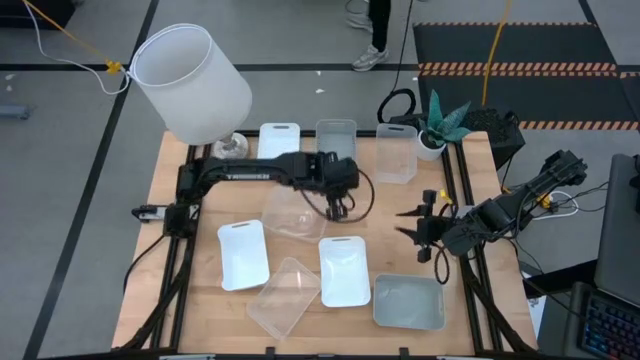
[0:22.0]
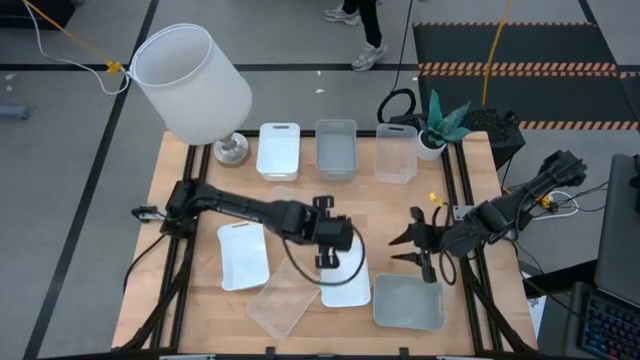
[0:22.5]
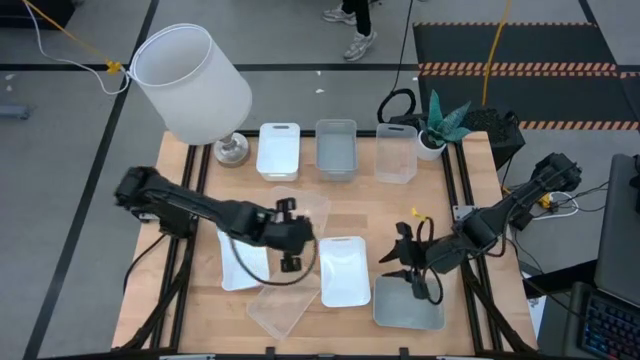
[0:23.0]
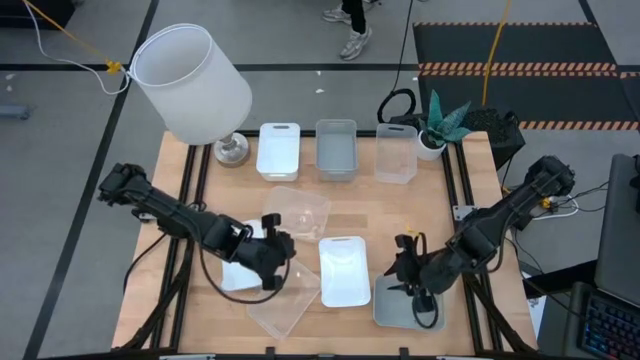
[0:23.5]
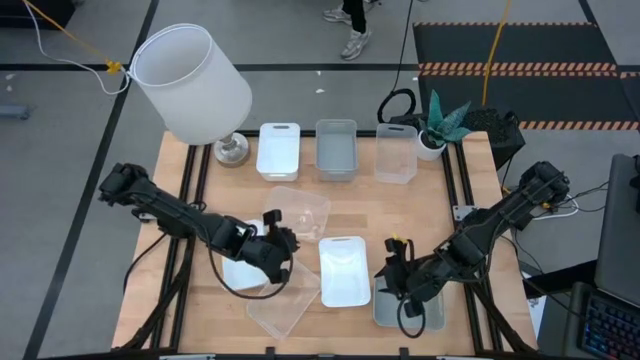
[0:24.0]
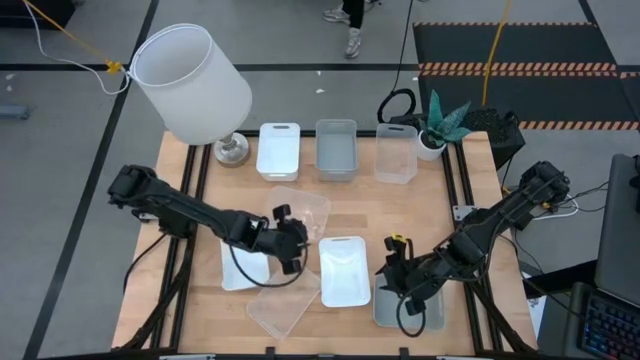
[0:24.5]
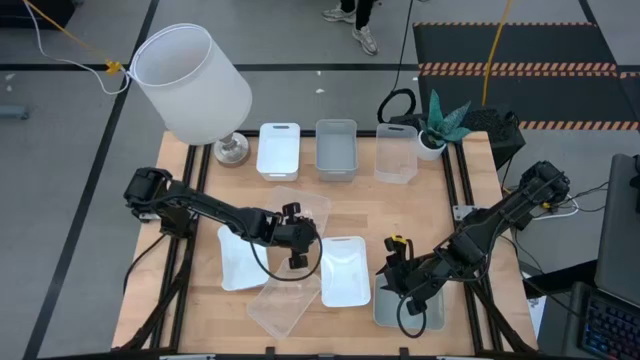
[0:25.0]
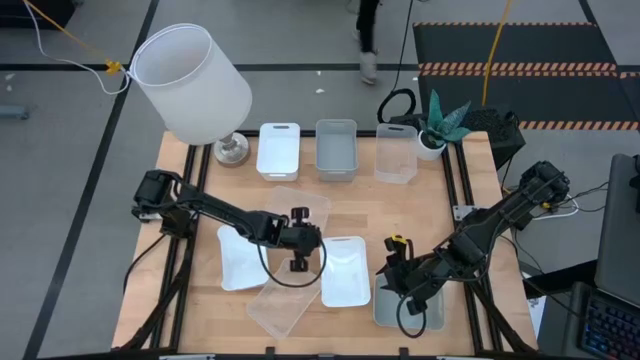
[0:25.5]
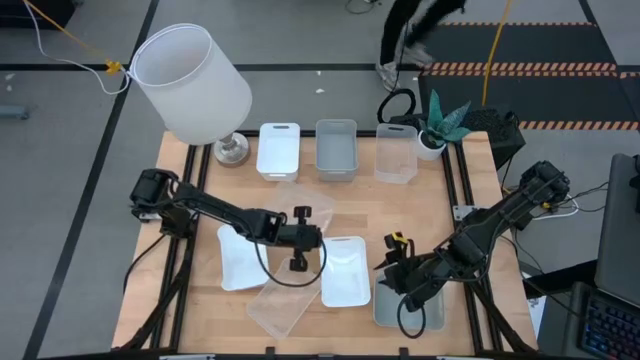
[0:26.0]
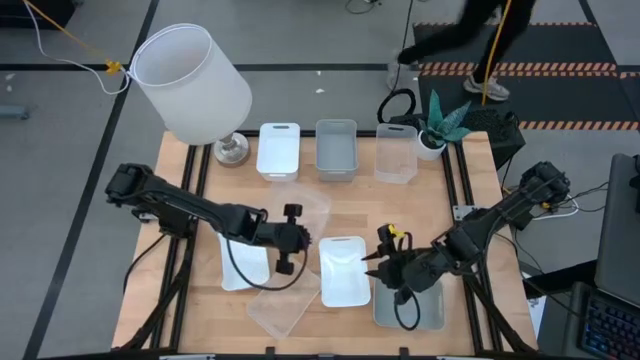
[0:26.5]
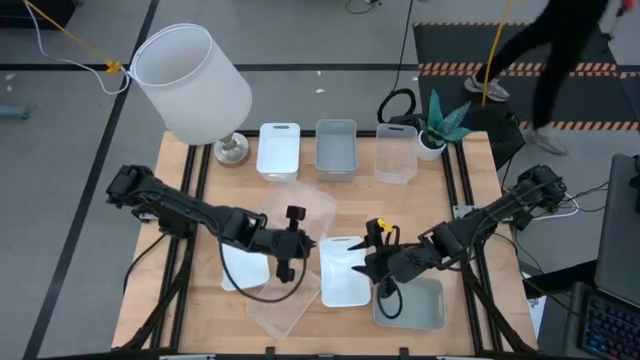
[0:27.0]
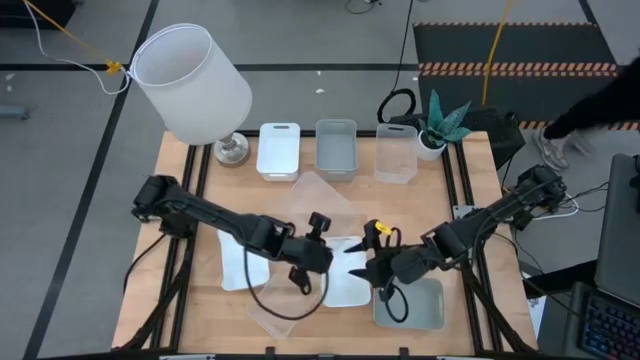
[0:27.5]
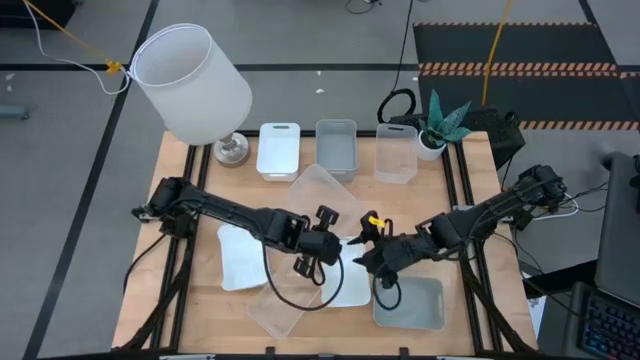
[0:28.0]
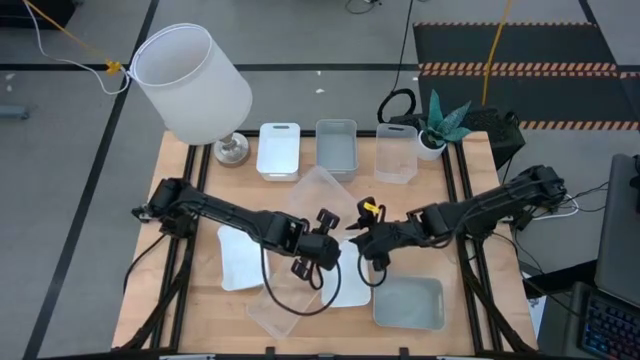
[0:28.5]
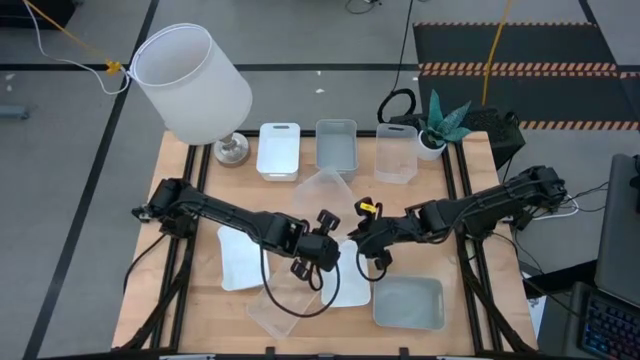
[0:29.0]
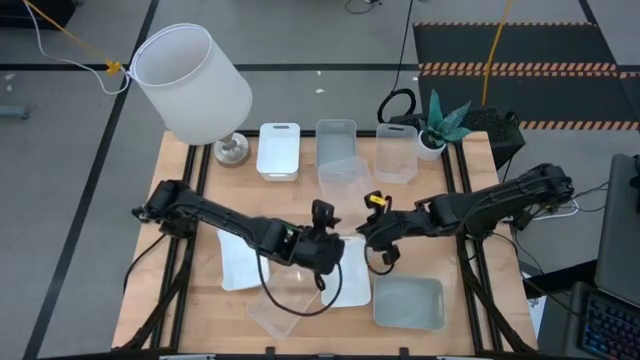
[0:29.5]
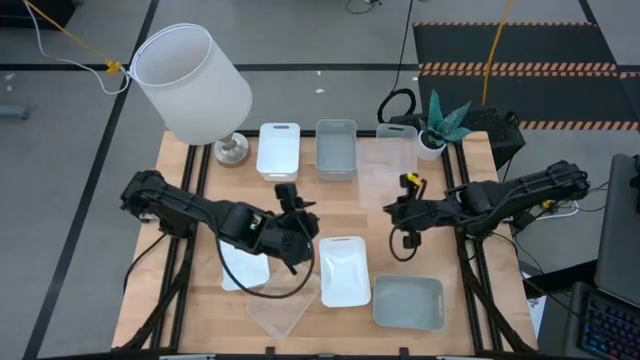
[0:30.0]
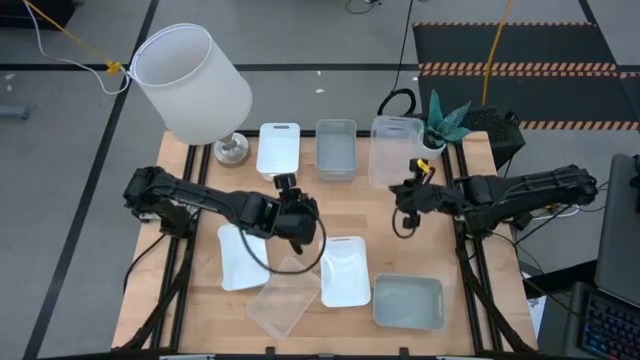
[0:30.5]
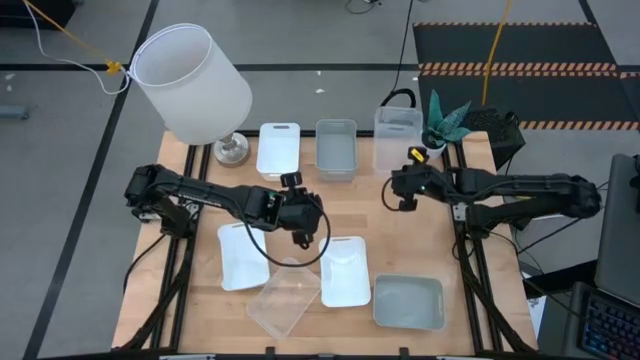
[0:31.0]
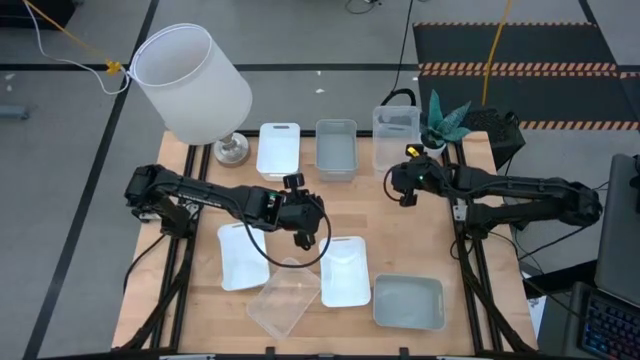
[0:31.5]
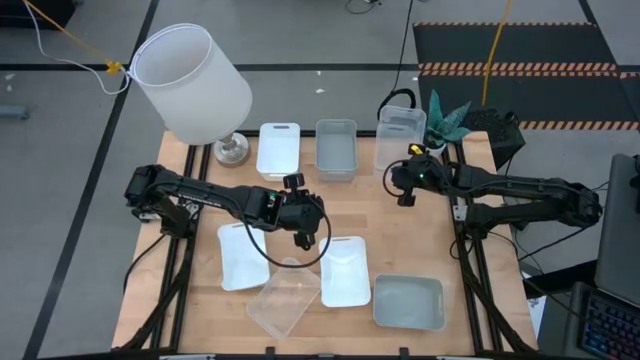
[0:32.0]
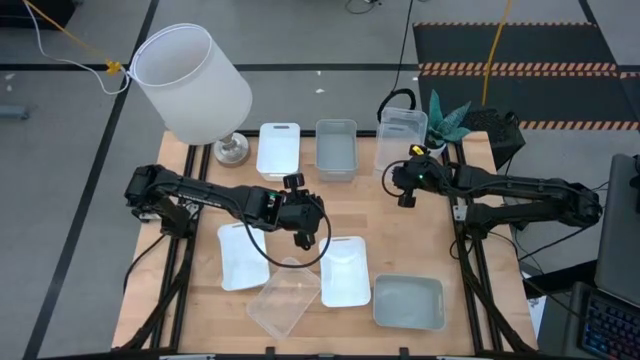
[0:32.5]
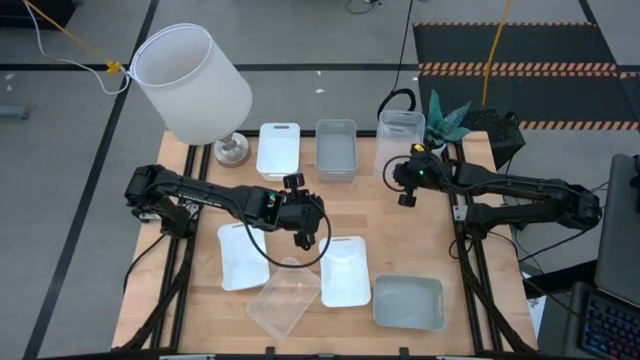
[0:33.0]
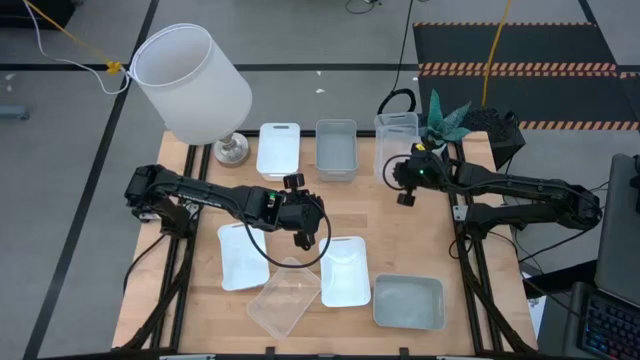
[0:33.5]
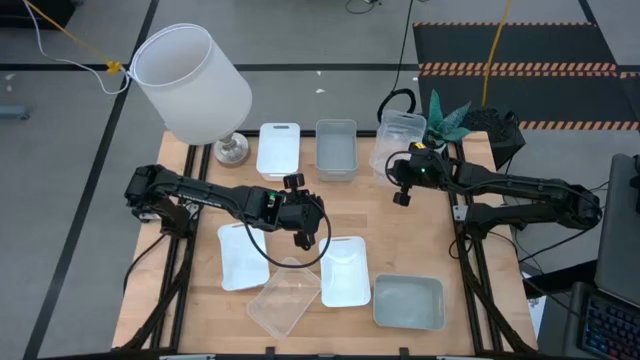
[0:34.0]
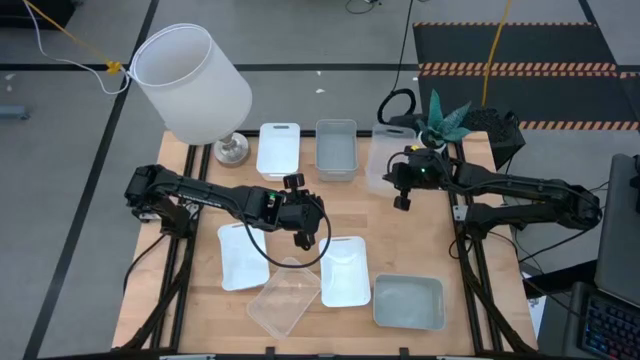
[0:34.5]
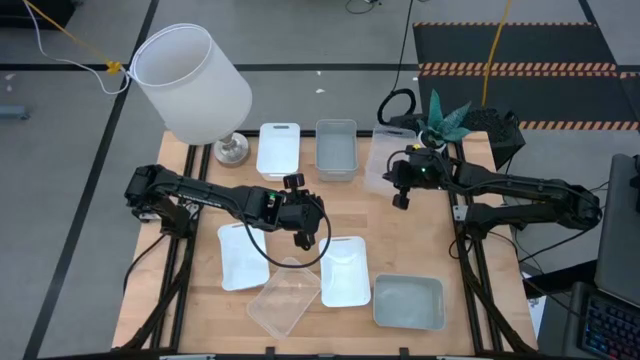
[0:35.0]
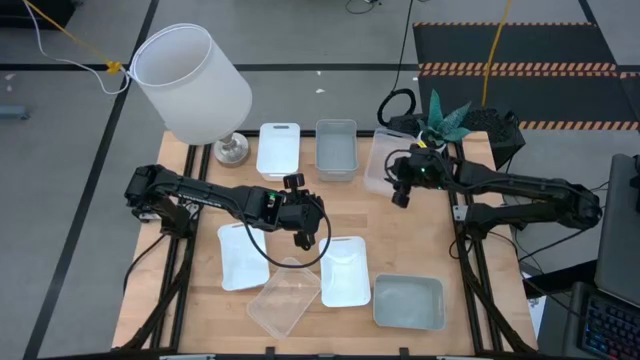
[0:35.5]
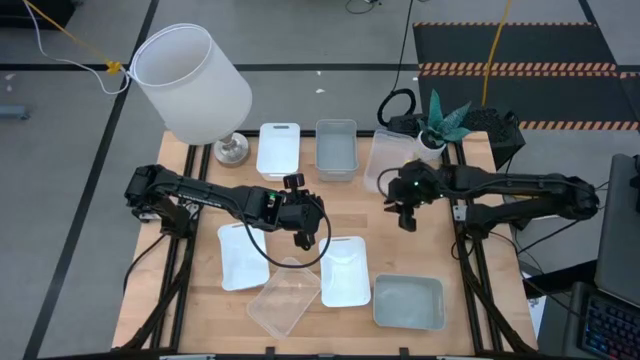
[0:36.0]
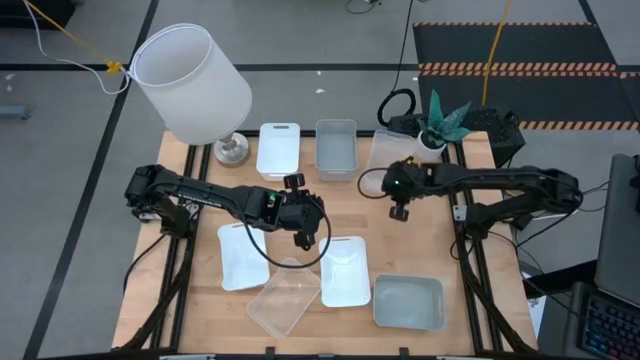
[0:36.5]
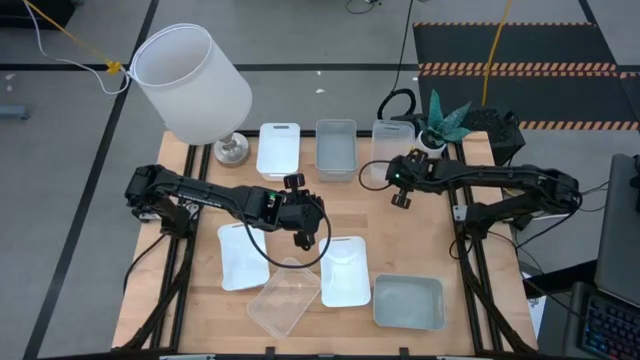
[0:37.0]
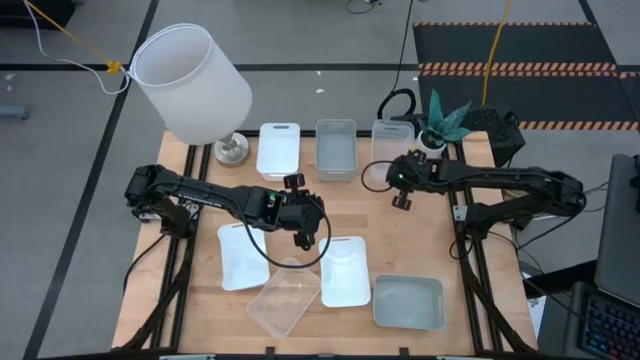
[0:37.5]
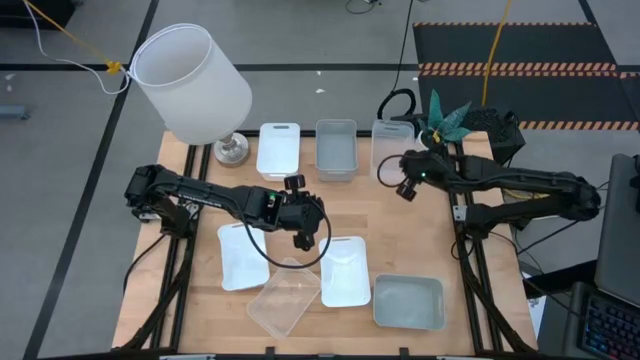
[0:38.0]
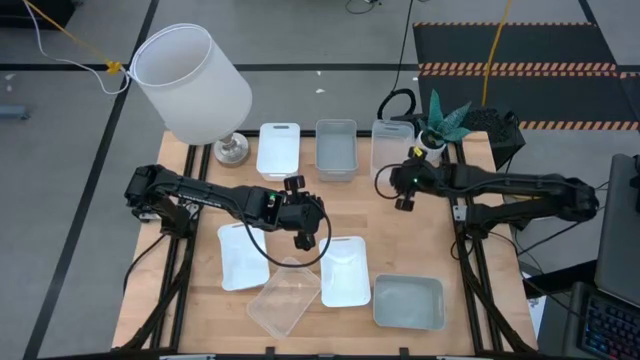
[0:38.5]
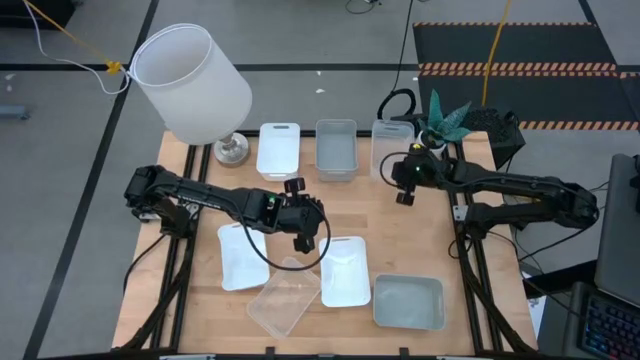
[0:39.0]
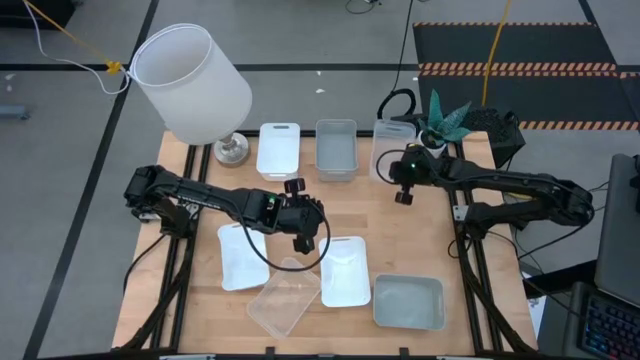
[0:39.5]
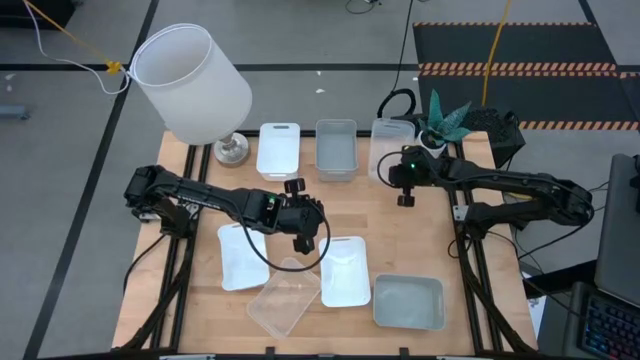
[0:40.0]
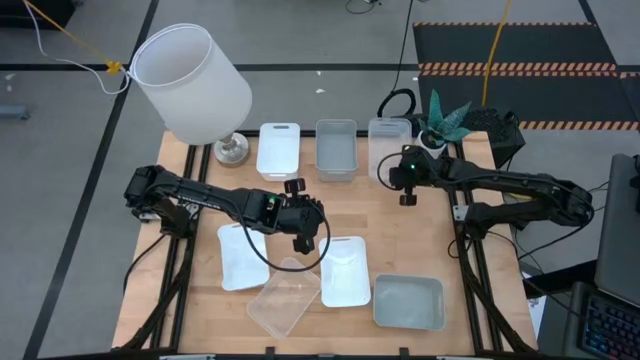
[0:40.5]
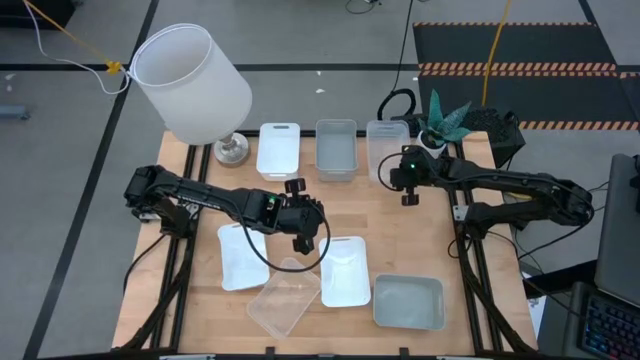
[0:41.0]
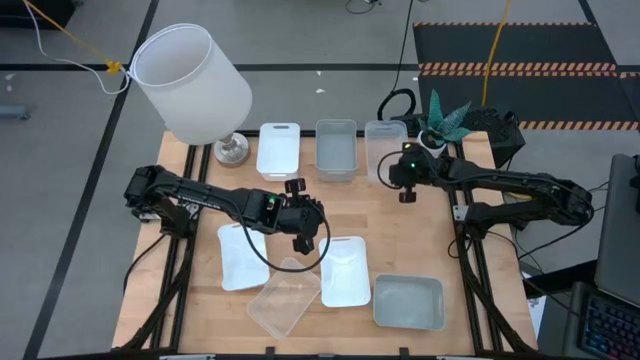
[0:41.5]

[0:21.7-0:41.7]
Stack the middle transparent bin on the top right transparent bin
